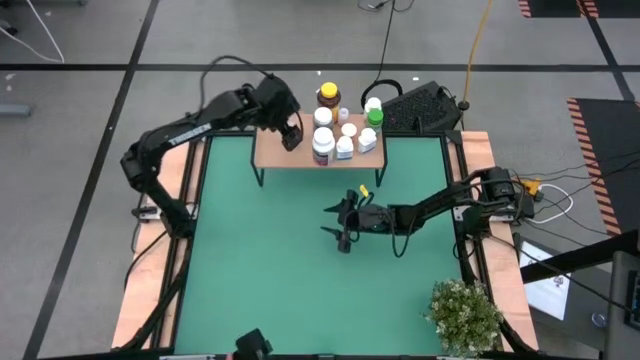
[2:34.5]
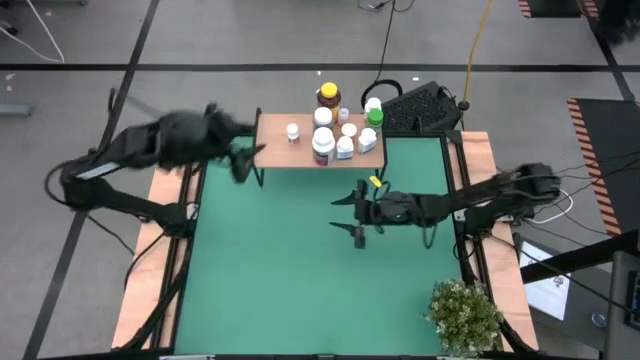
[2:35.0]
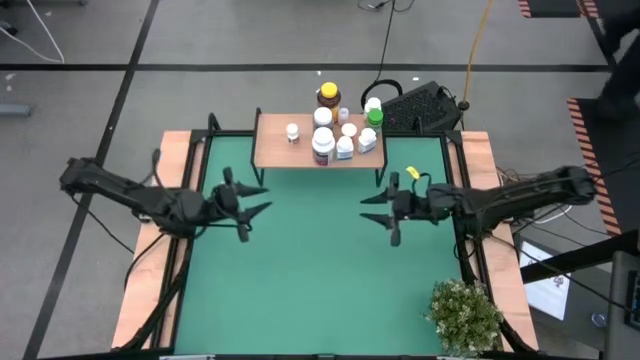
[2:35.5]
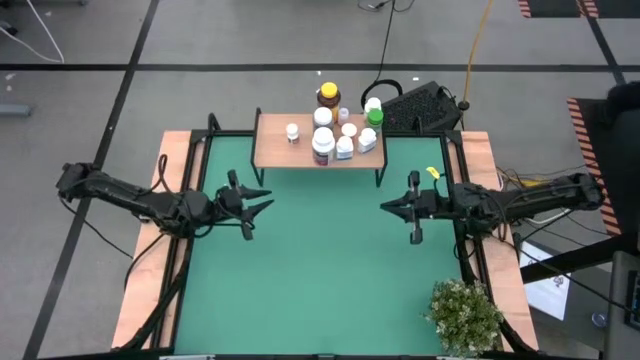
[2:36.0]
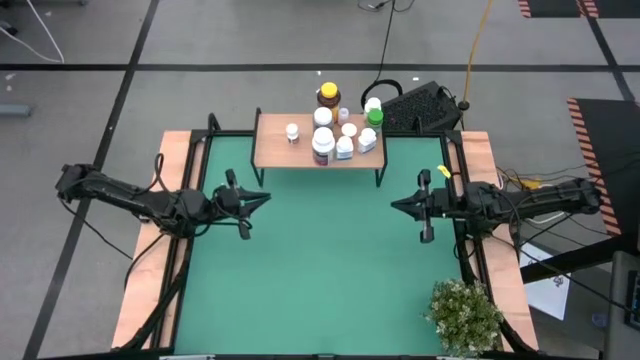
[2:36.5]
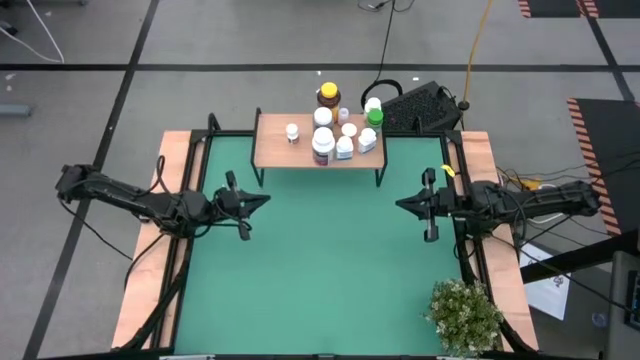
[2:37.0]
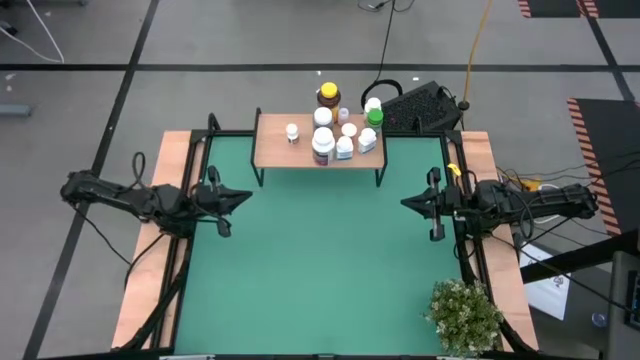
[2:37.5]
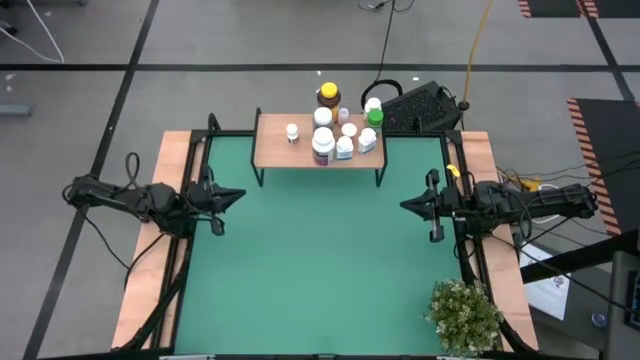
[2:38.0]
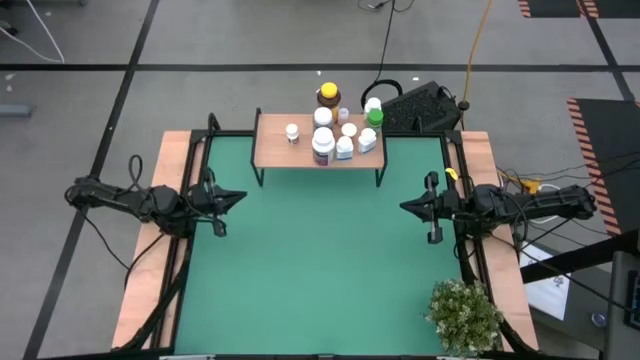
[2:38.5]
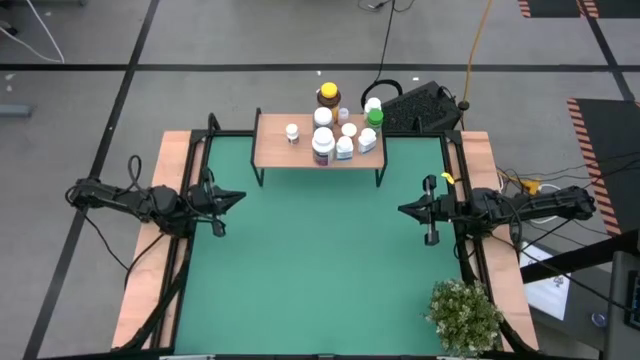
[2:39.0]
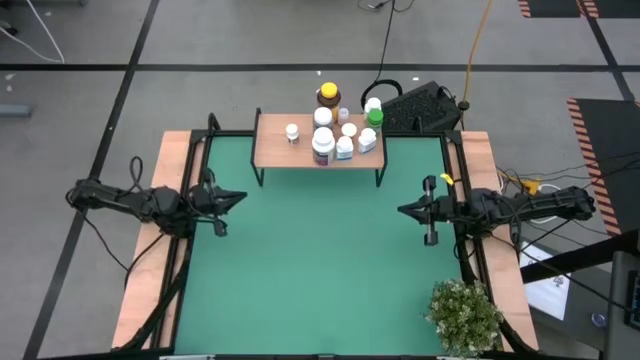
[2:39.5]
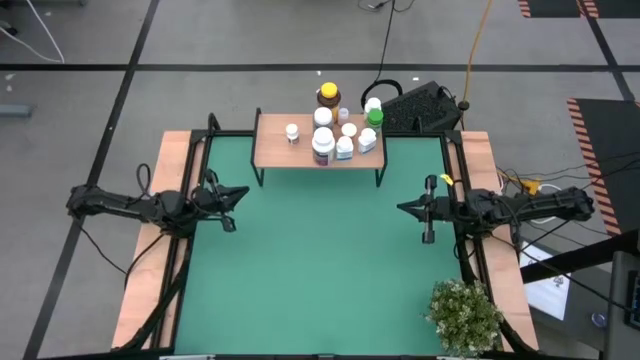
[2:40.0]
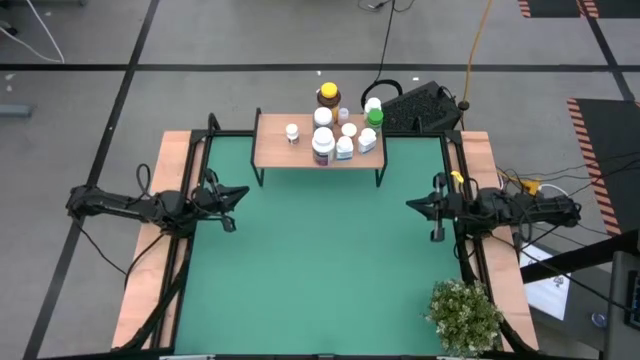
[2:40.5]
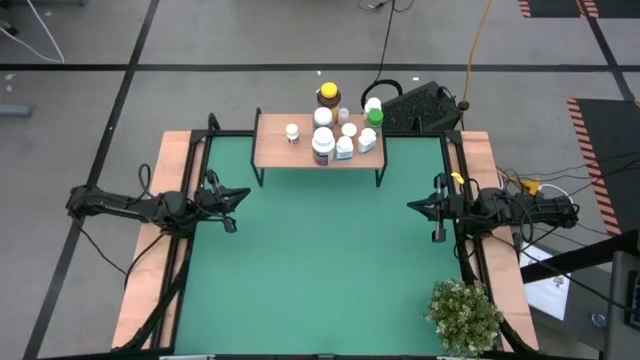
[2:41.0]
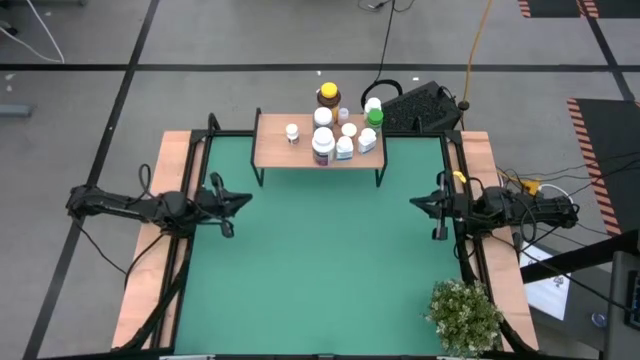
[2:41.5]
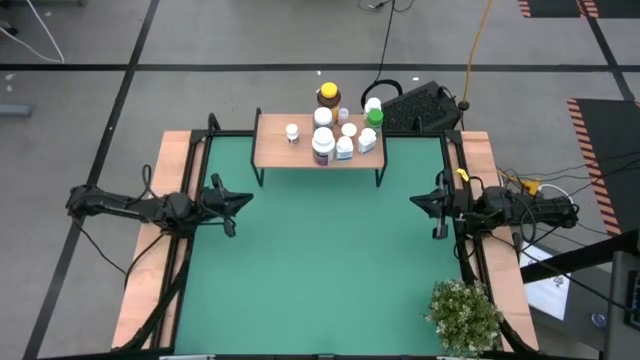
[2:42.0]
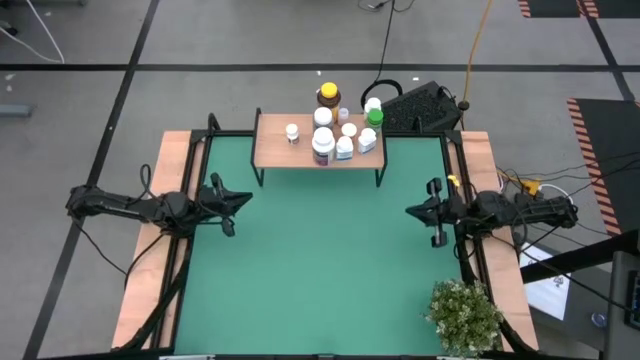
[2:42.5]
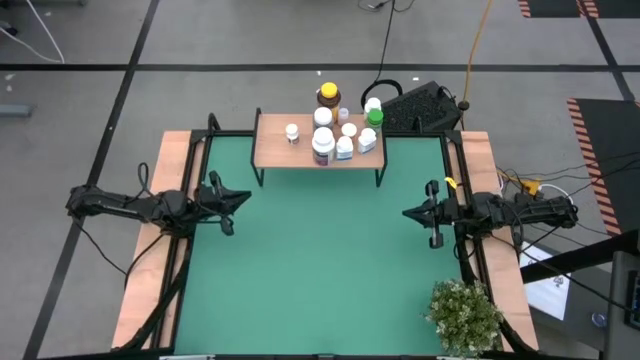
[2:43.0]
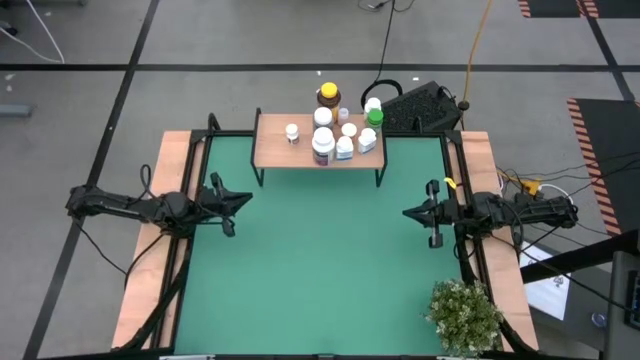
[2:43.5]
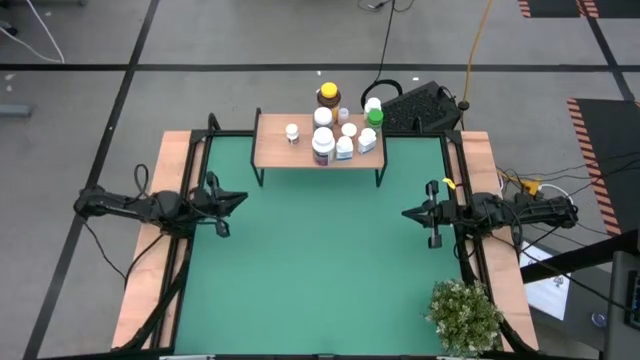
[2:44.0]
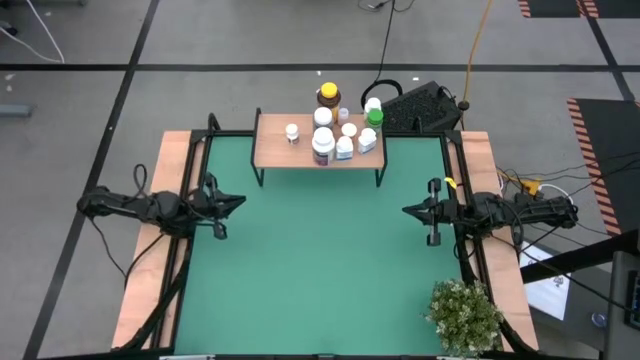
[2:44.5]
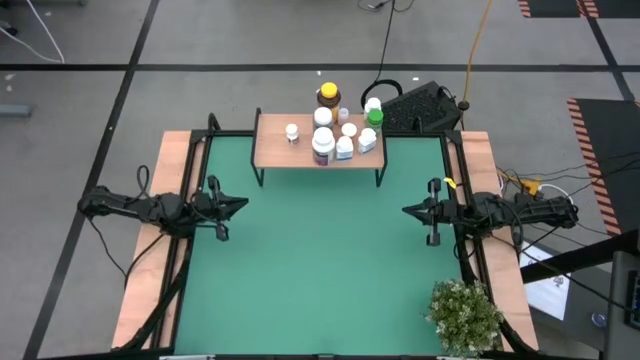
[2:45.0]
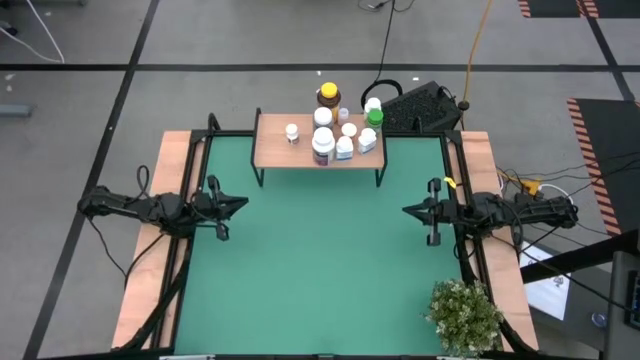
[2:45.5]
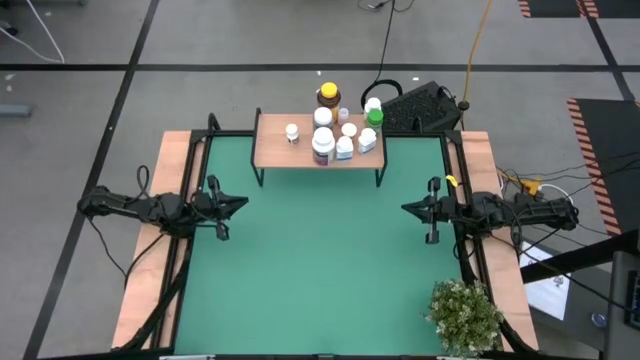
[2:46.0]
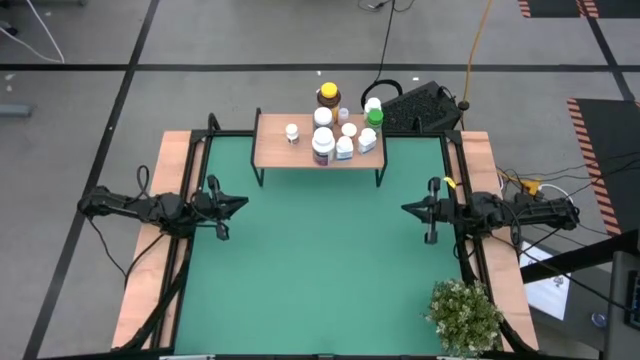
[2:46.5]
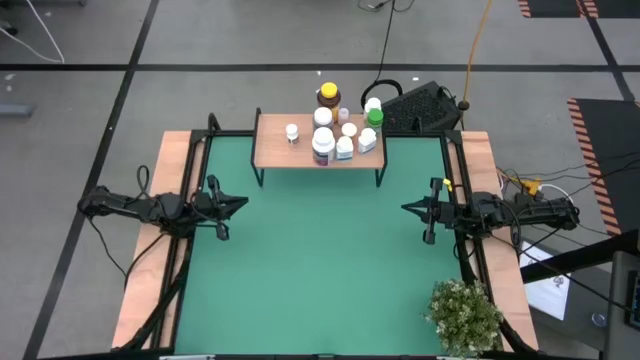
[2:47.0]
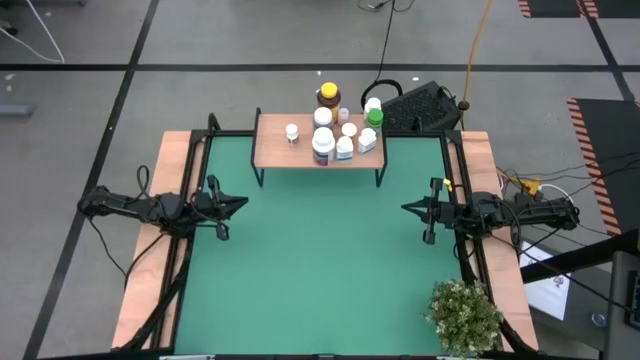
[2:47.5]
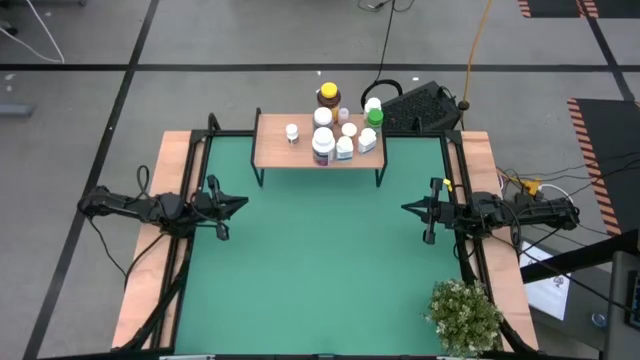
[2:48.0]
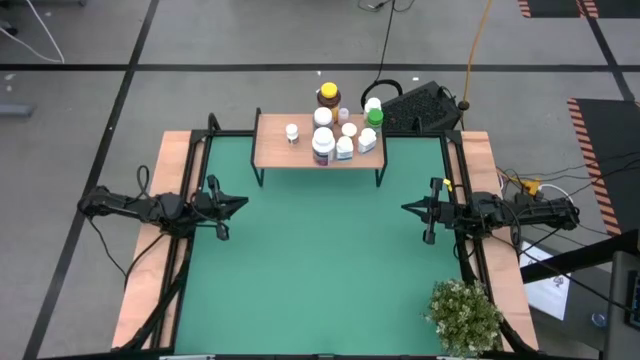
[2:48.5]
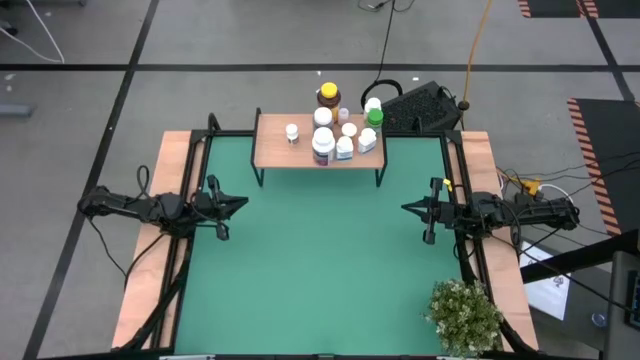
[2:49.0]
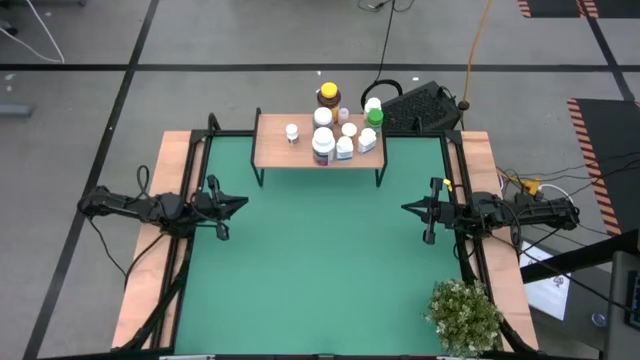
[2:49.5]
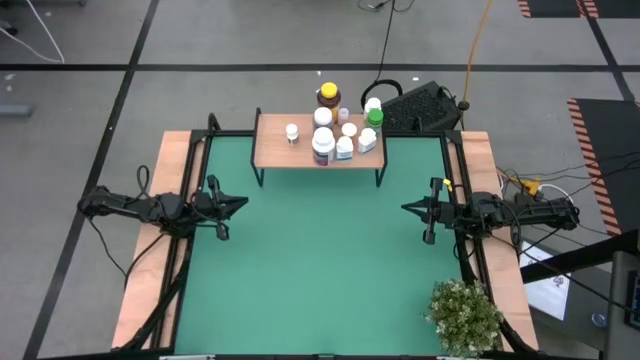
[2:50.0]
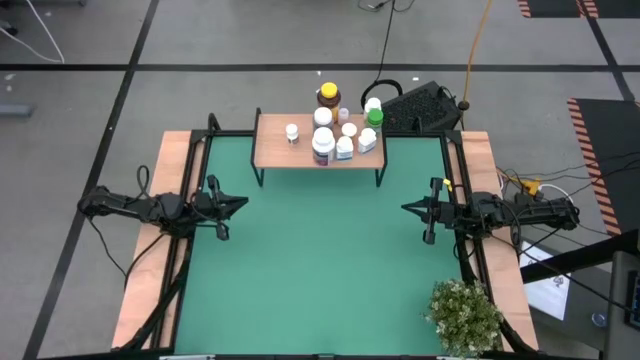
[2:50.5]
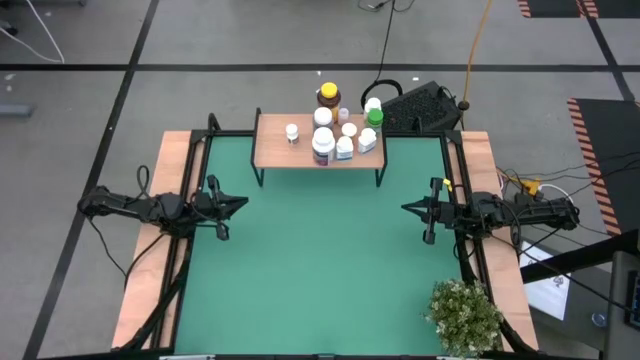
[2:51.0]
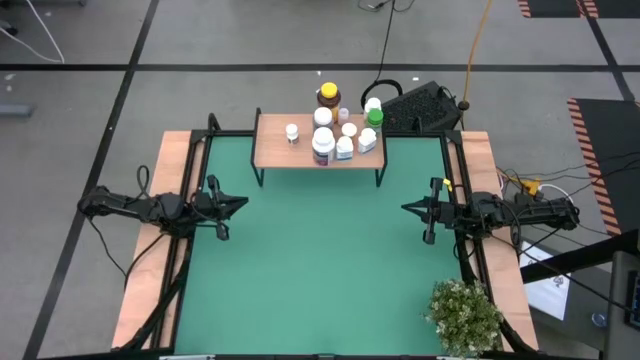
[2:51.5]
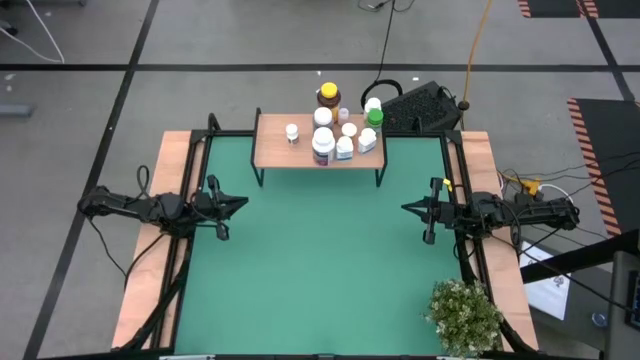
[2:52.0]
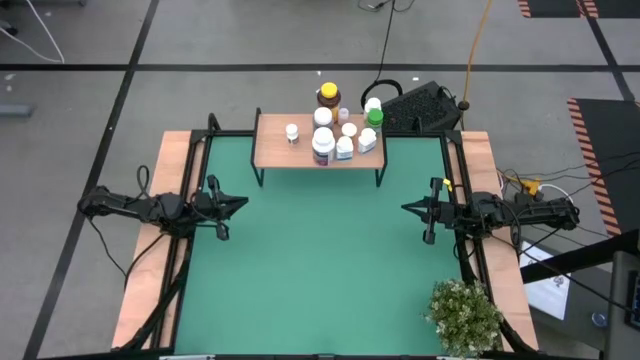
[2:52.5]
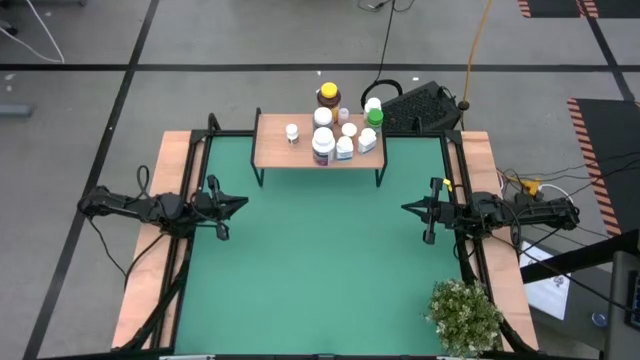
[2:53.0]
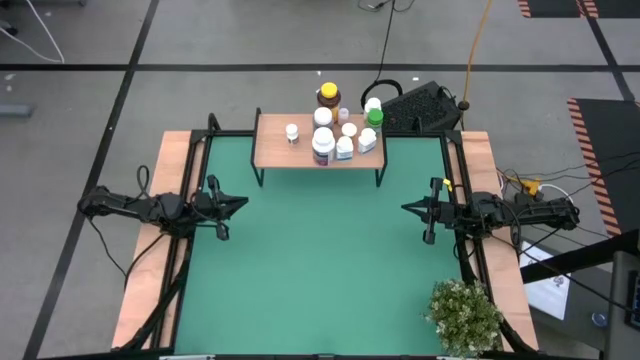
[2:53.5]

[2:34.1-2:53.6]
Task: Pick and place medicine bottles onto shelf by color
Return to Home Position
